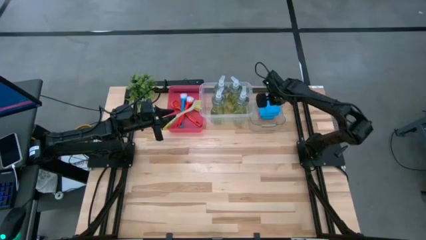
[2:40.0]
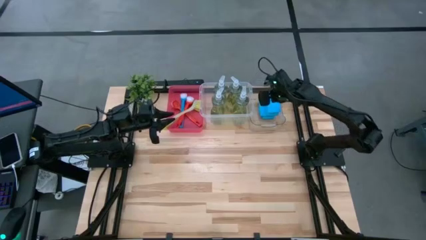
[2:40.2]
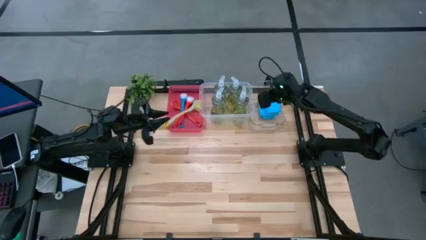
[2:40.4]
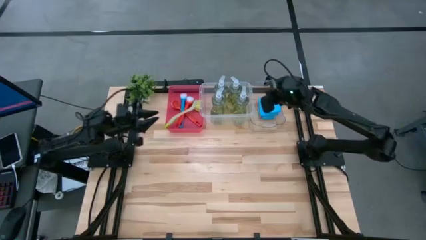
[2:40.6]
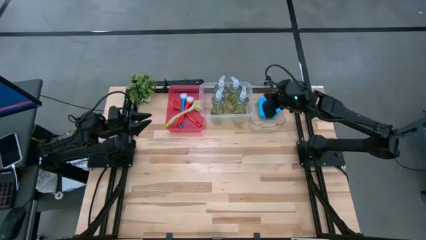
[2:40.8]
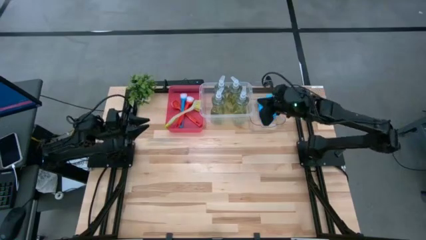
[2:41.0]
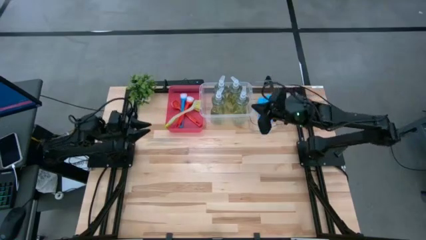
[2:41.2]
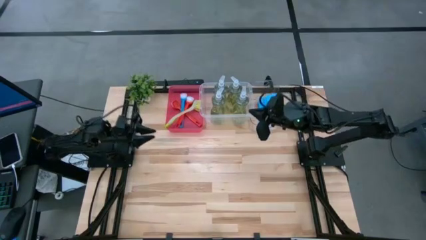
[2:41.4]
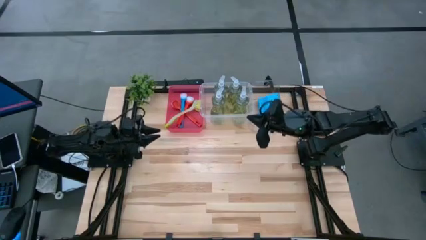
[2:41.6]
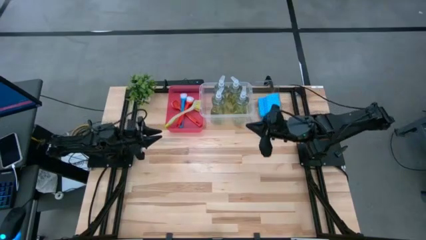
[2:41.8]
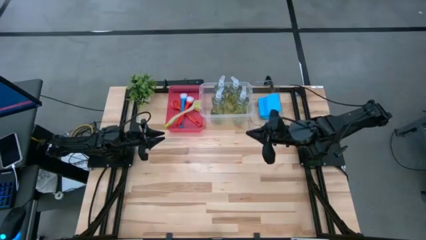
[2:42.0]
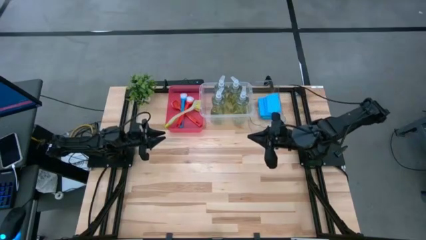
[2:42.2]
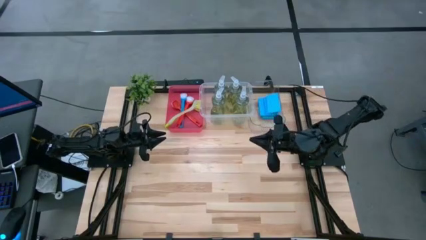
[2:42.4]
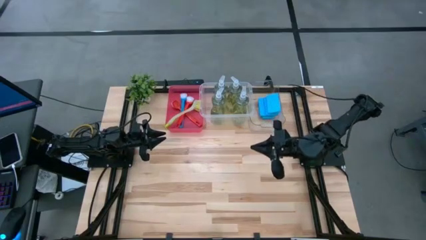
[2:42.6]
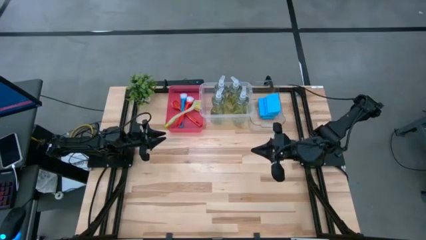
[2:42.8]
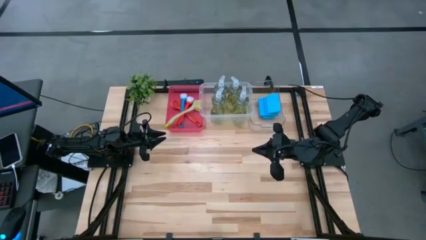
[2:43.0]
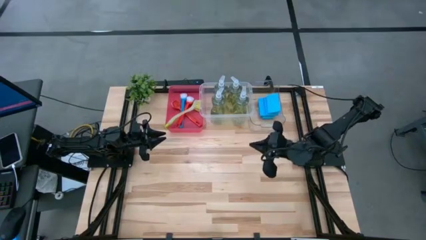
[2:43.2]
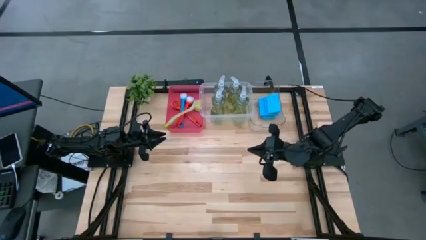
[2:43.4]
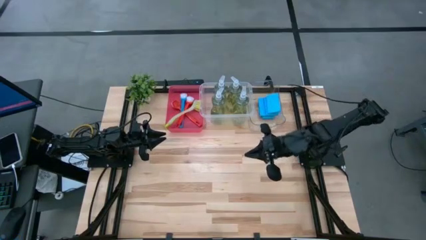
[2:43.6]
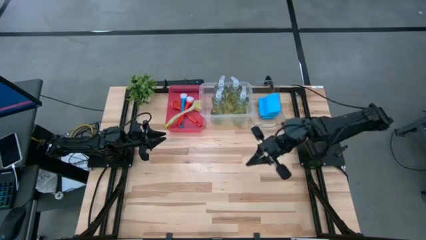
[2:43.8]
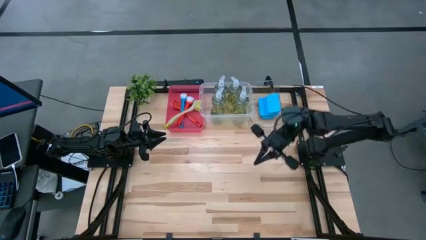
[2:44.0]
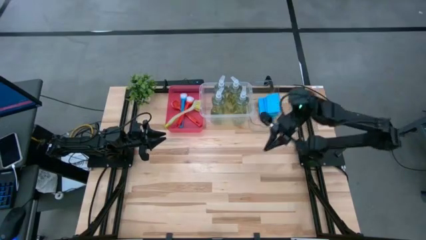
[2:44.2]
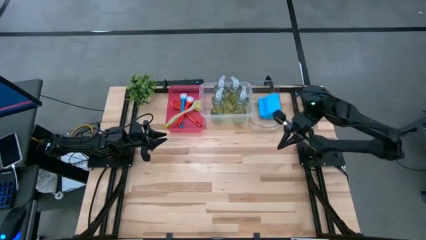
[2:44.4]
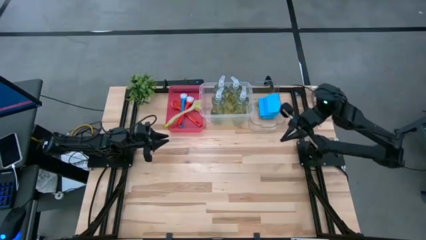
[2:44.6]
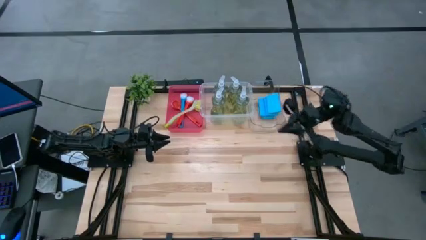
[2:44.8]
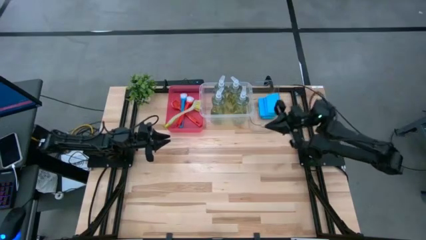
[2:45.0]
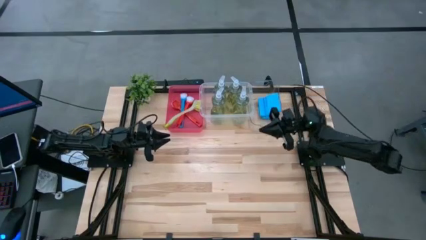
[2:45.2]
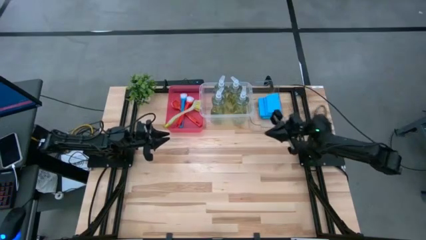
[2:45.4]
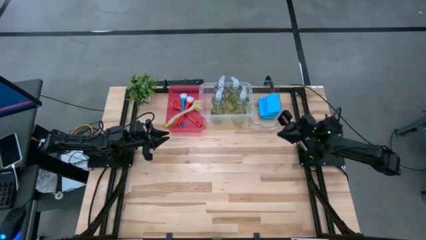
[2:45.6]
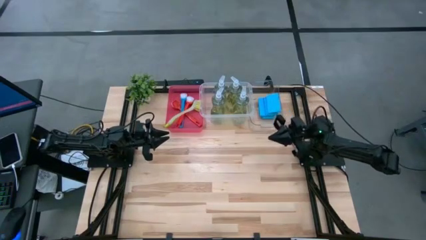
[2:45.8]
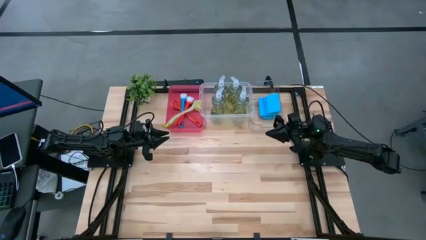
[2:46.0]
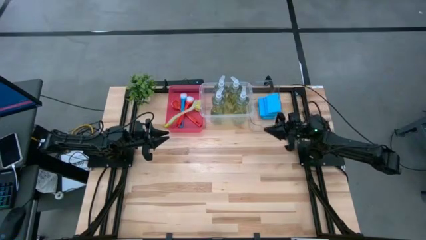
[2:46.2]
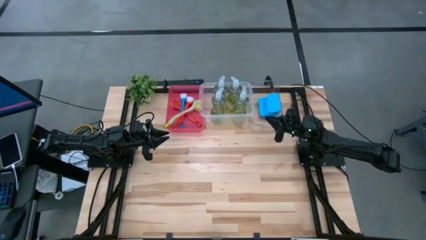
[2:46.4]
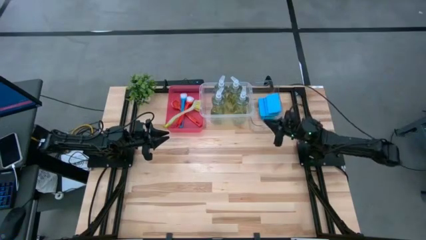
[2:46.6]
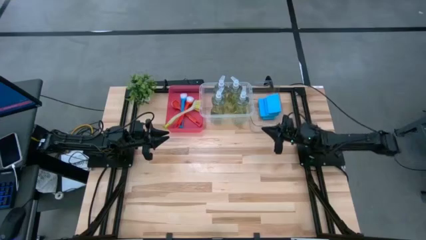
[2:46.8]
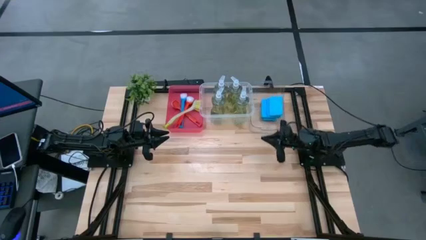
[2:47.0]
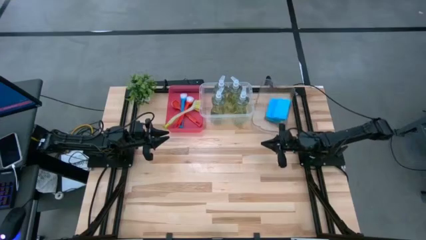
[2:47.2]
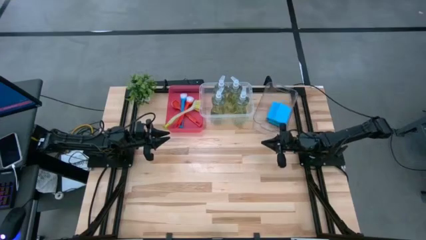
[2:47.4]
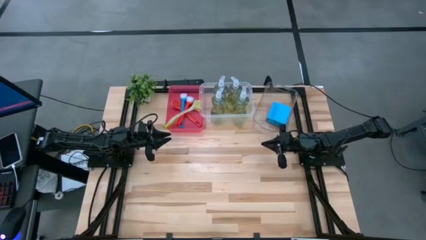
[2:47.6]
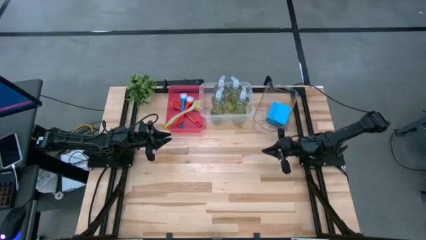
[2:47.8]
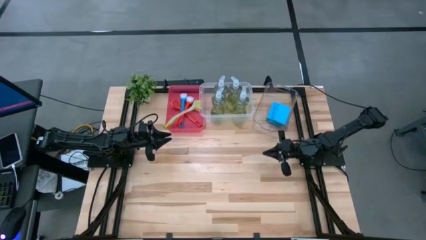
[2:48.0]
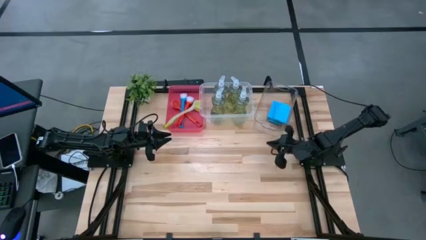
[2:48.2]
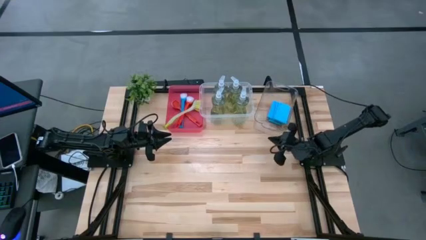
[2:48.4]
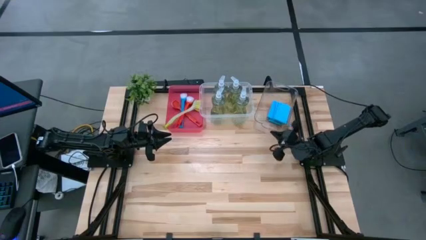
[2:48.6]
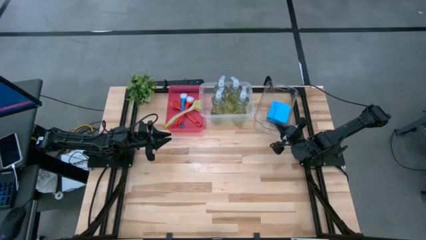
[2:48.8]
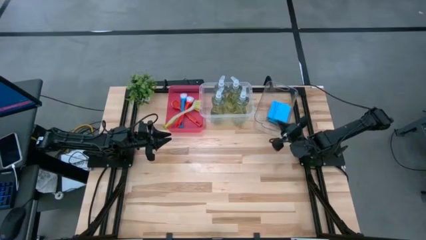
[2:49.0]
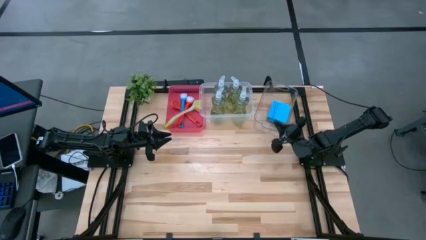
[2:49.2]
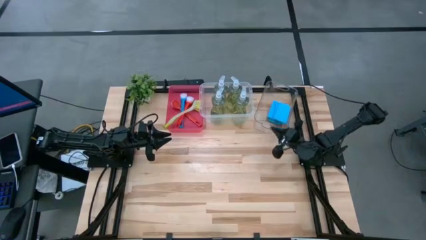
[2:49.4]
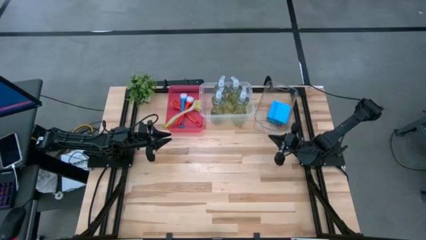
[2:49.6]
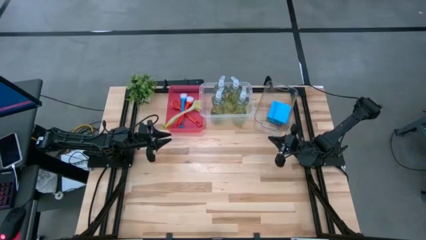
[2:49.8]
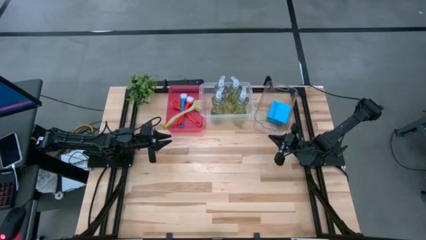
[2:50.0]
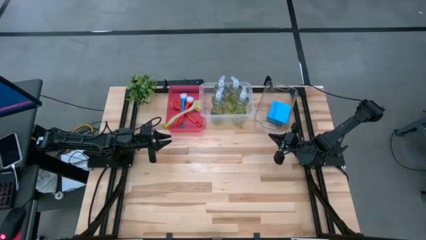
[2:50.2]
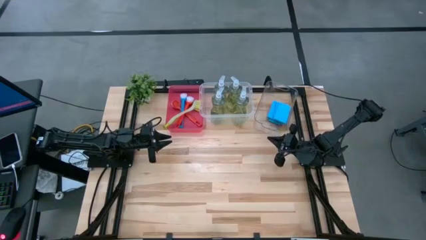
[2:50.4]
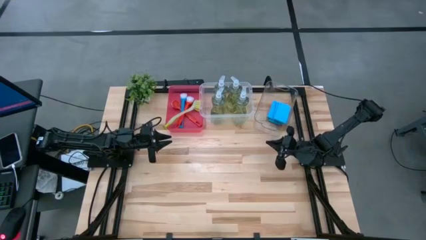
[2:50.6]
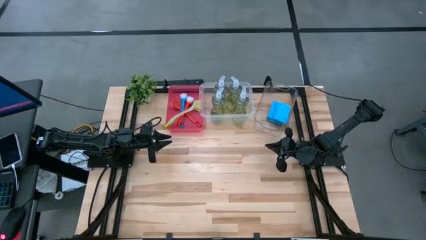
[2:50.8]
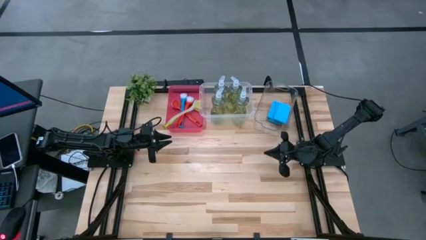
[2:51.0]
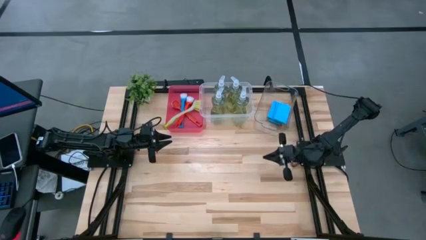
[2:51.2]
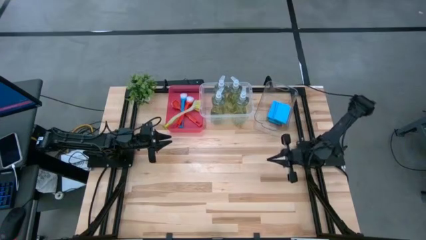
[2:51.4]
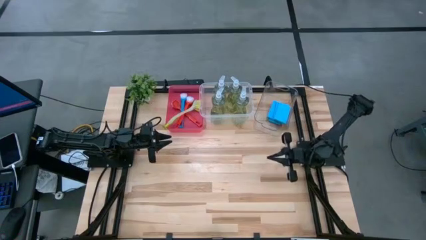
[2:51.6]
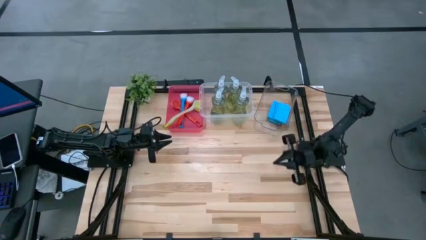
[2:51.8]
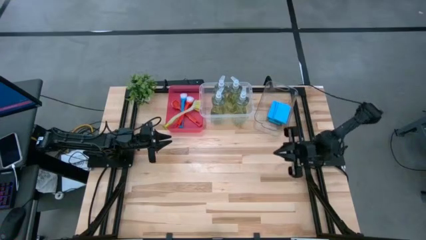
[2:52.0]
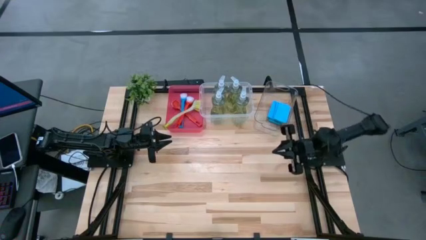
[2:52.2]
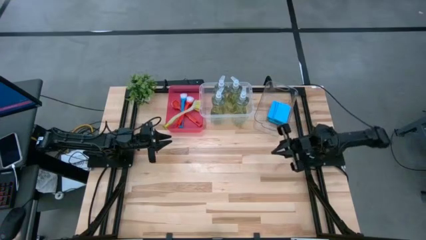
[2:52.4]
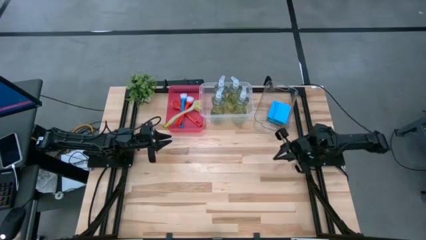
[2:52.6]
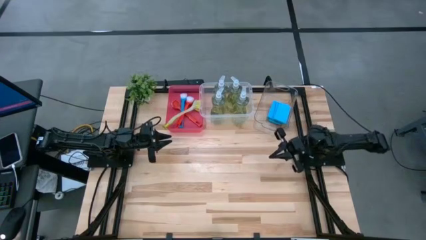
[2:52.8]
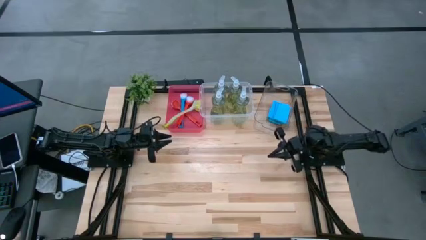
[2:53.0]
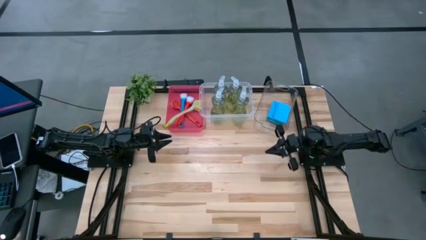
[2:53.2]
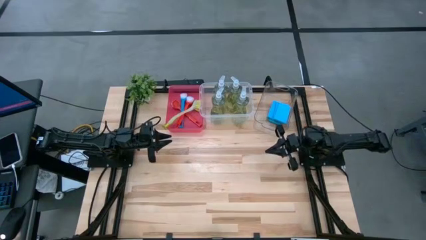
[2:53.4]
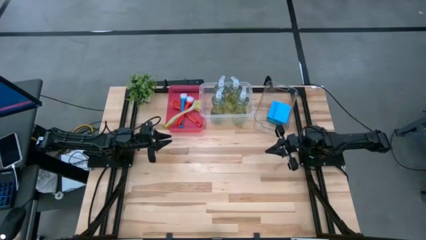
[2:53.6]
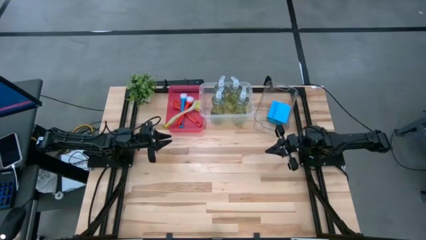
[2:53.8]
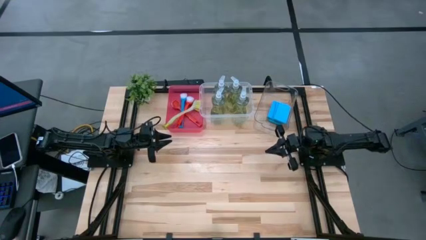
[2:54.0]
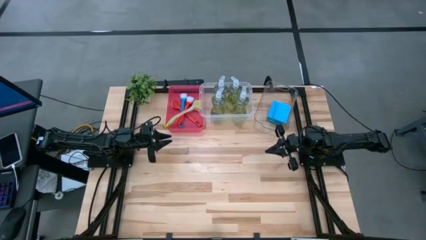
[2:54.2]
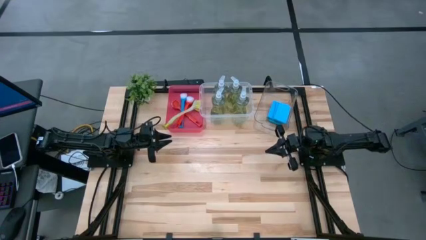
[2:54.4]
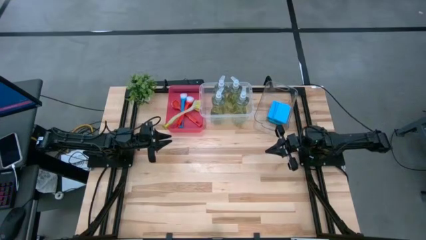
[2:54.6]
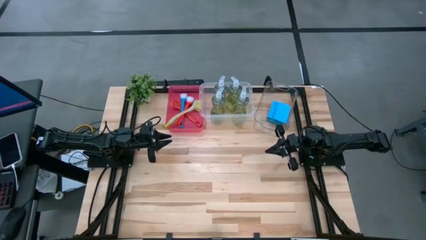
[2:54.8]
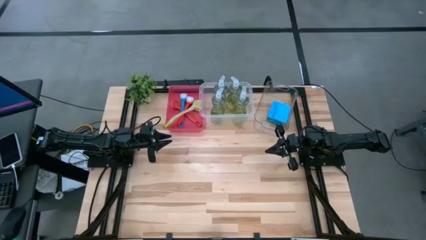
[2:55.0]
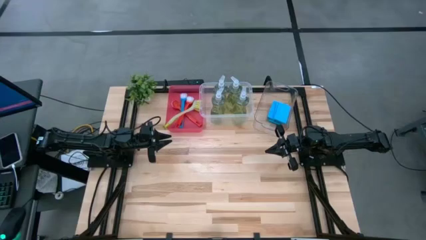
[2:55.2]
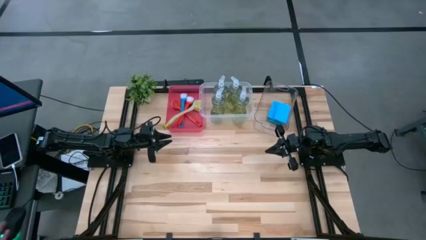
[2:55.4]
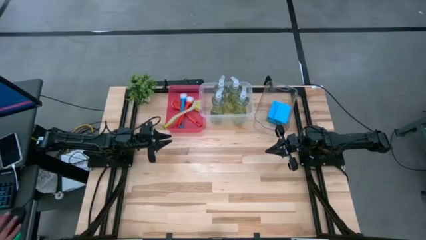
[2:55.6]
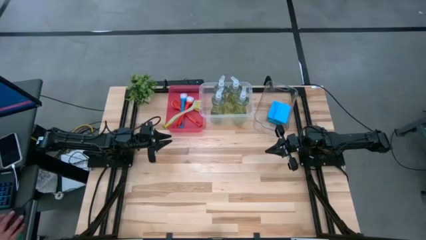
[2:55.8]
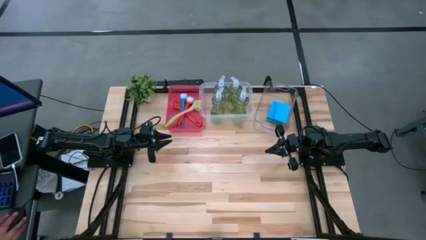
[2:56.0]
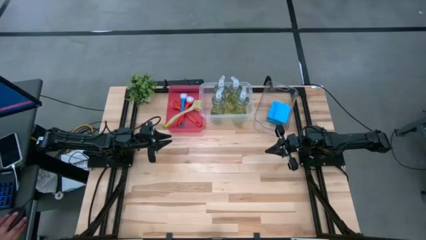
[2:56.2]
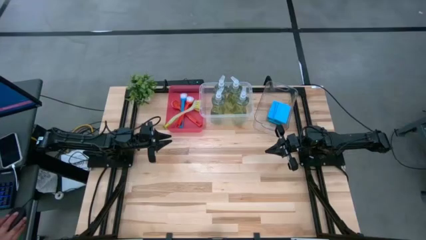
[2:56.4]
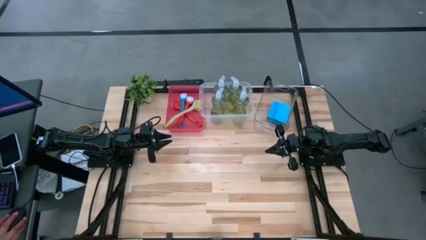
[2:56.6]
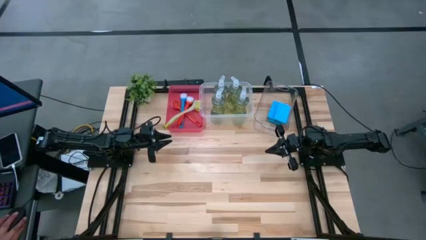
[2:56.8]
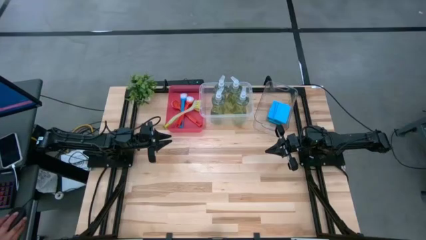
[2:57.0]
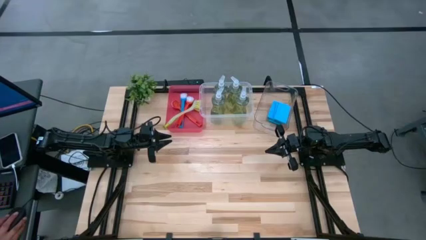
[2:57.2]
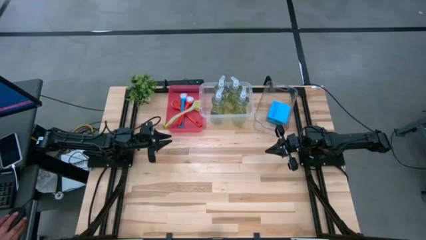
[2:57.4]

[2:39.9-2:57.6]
Task: Pick & Place Kitchen Sink Supplies
Return to Home Position
